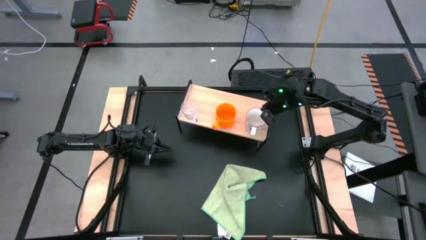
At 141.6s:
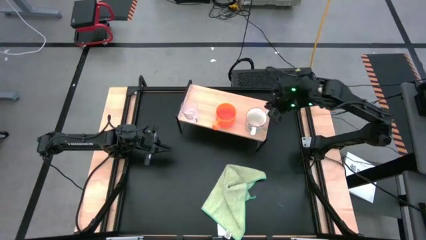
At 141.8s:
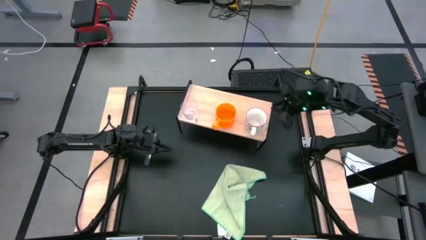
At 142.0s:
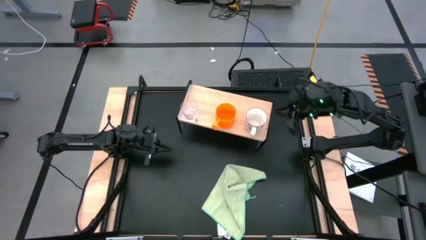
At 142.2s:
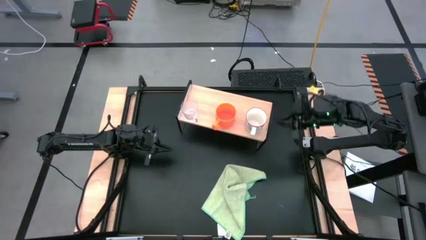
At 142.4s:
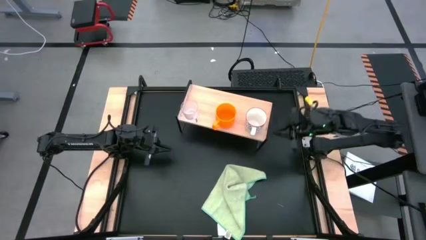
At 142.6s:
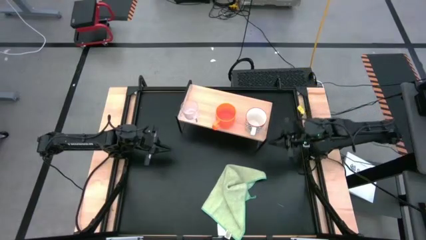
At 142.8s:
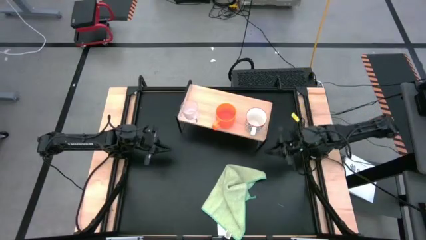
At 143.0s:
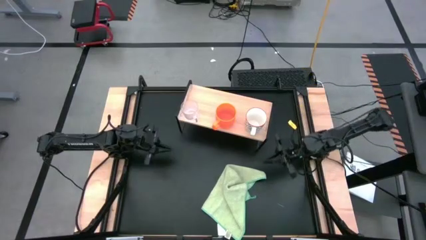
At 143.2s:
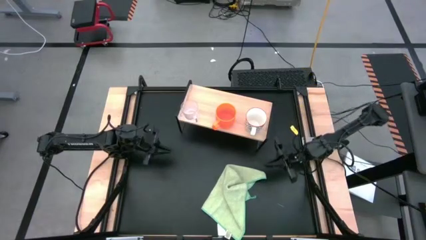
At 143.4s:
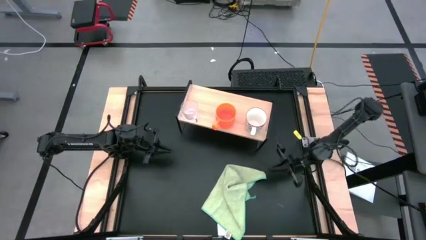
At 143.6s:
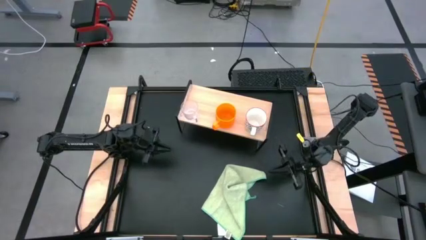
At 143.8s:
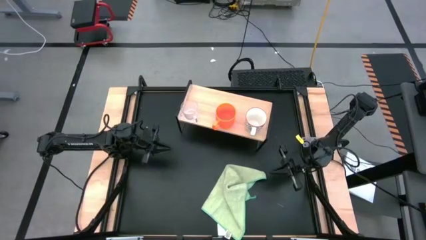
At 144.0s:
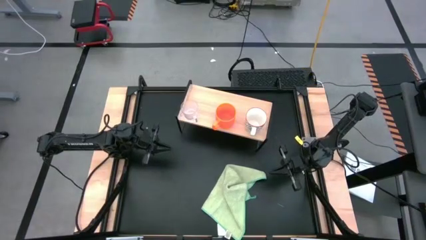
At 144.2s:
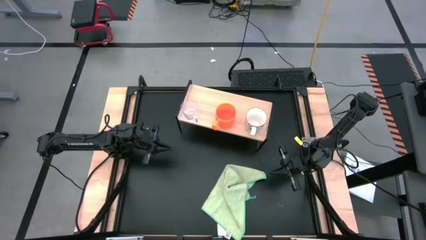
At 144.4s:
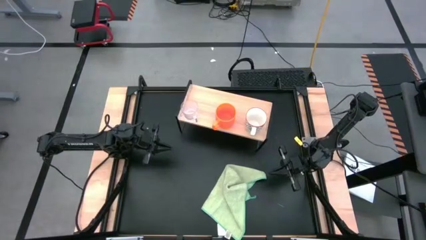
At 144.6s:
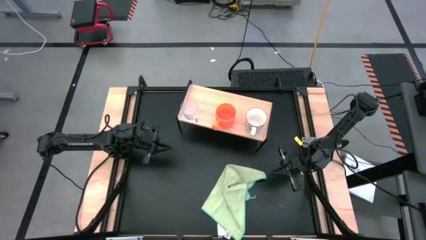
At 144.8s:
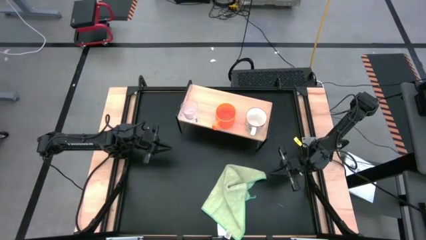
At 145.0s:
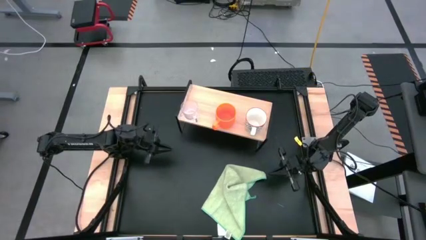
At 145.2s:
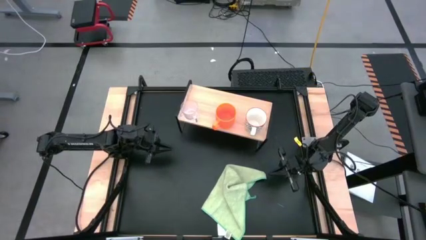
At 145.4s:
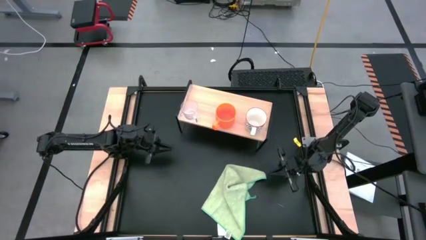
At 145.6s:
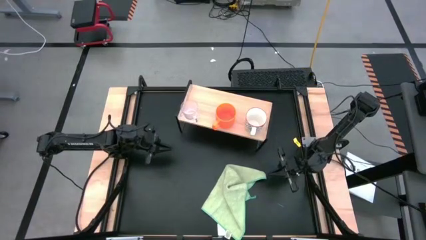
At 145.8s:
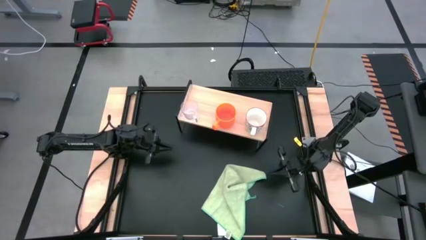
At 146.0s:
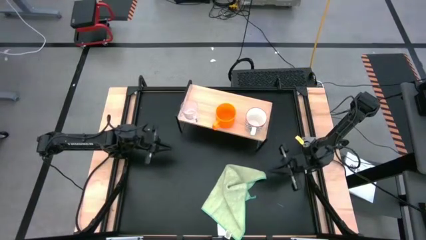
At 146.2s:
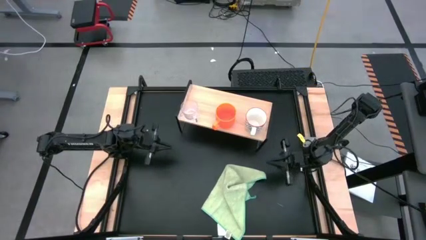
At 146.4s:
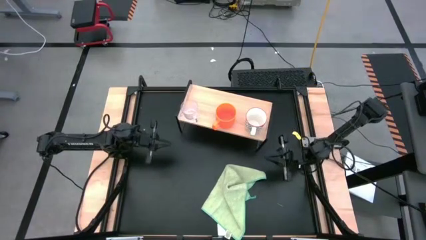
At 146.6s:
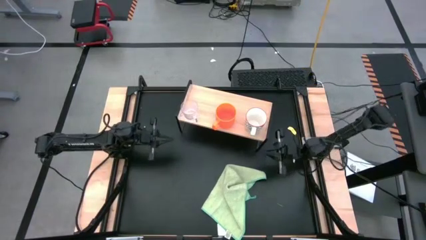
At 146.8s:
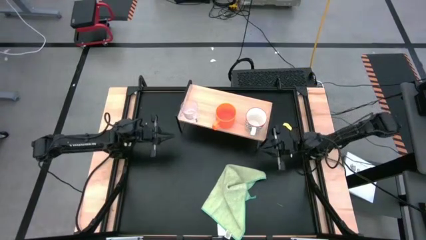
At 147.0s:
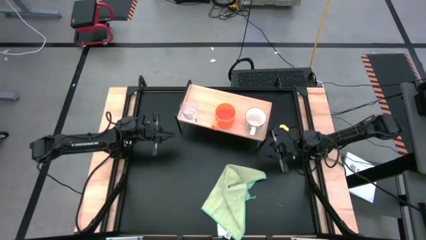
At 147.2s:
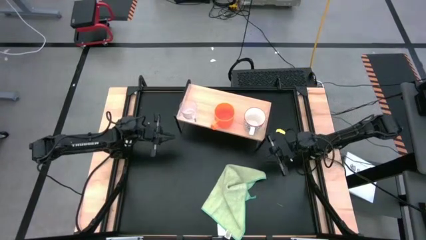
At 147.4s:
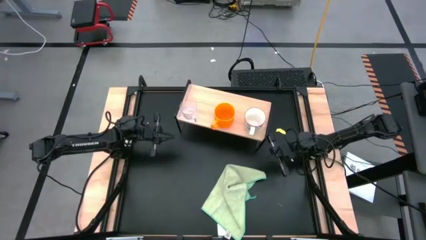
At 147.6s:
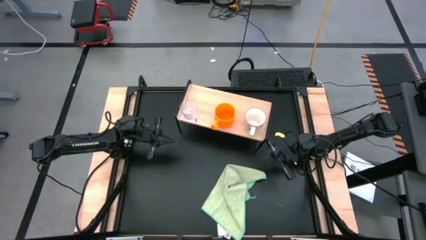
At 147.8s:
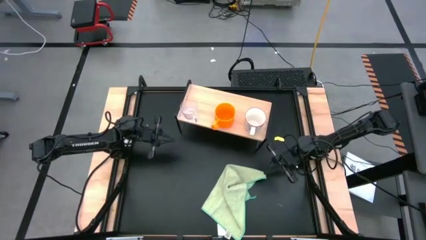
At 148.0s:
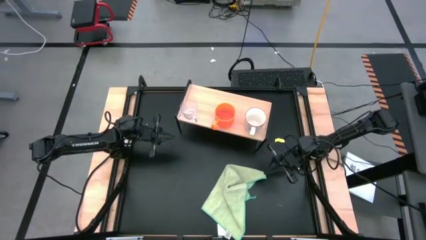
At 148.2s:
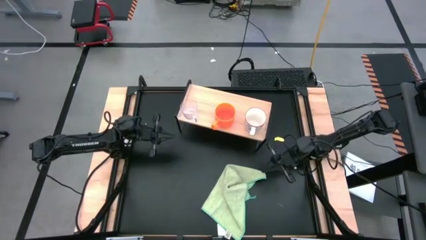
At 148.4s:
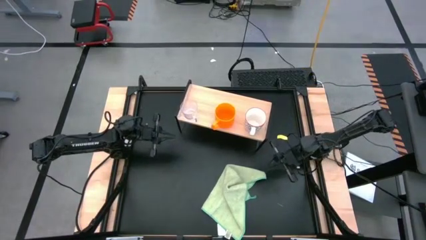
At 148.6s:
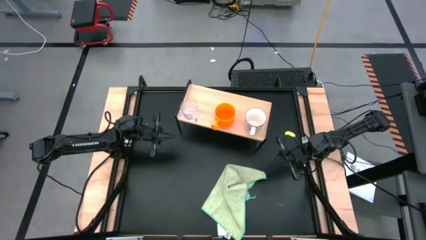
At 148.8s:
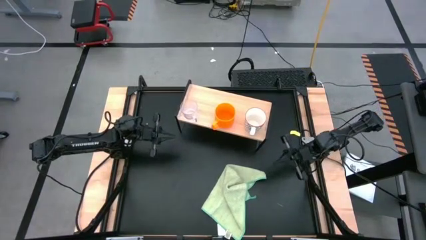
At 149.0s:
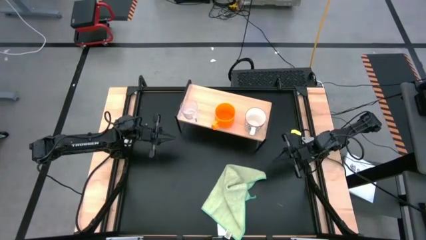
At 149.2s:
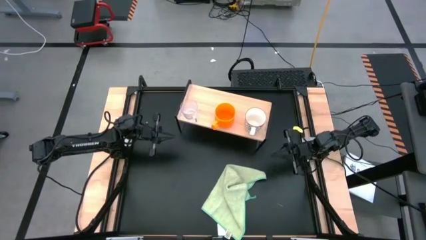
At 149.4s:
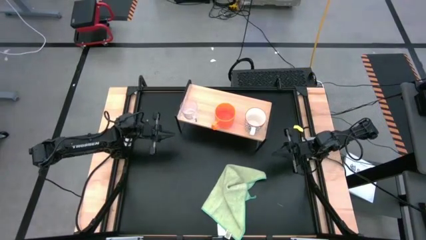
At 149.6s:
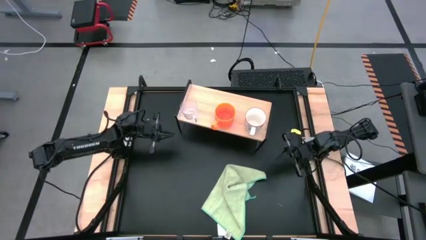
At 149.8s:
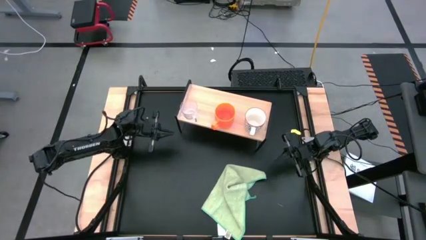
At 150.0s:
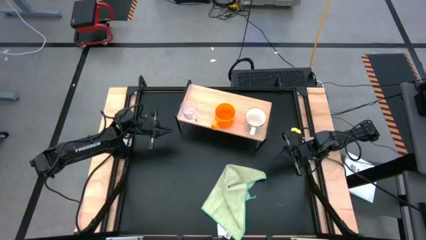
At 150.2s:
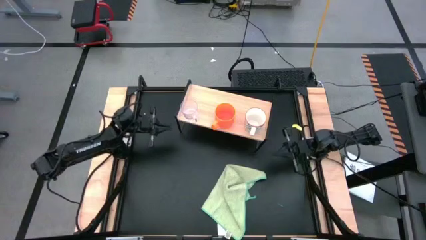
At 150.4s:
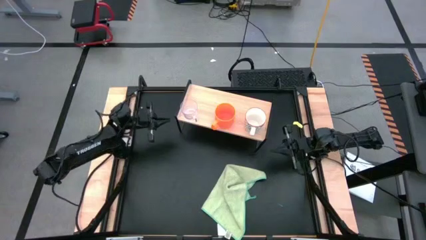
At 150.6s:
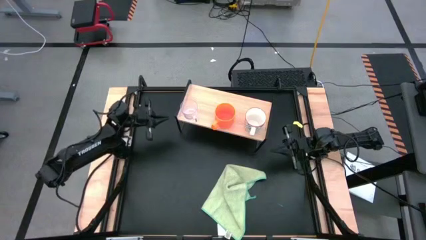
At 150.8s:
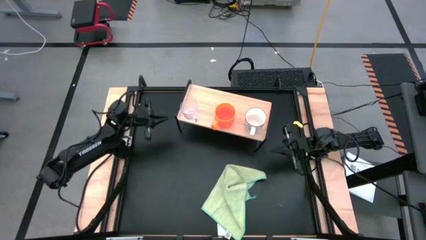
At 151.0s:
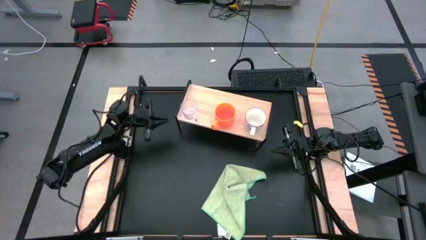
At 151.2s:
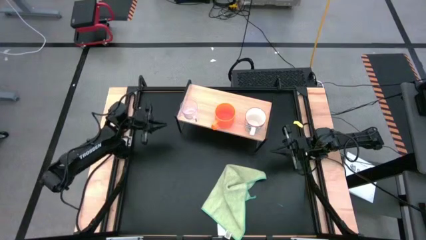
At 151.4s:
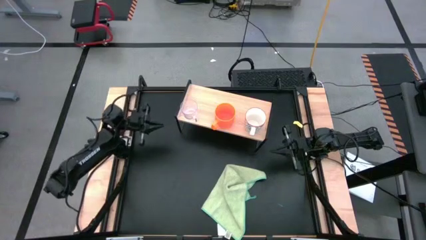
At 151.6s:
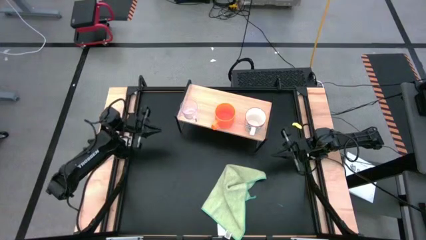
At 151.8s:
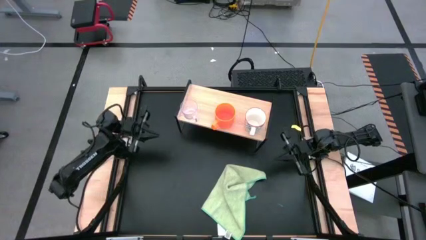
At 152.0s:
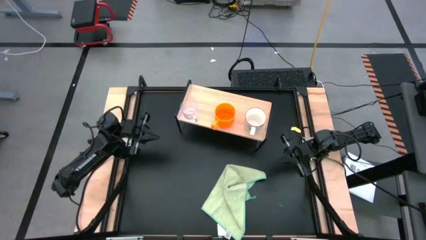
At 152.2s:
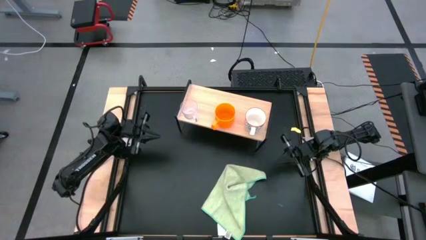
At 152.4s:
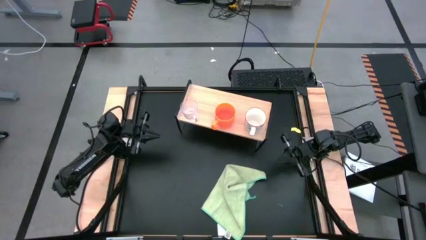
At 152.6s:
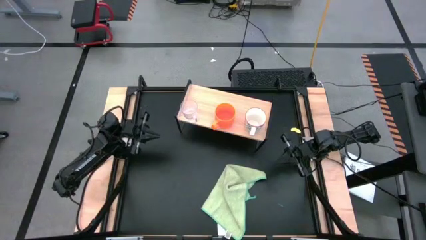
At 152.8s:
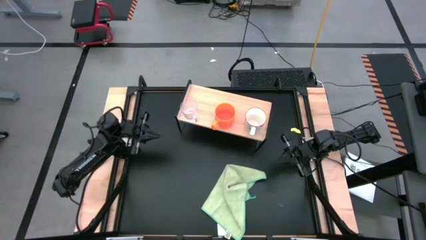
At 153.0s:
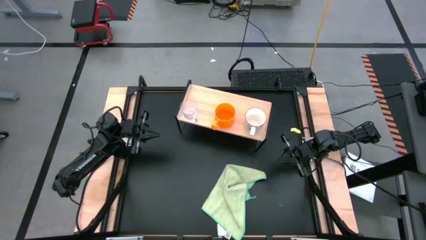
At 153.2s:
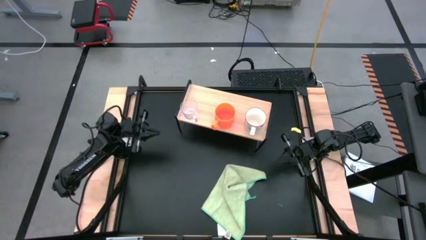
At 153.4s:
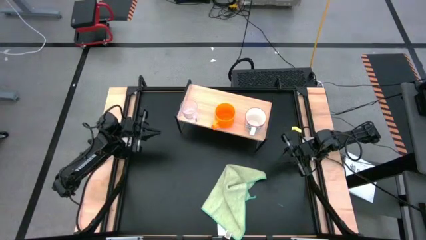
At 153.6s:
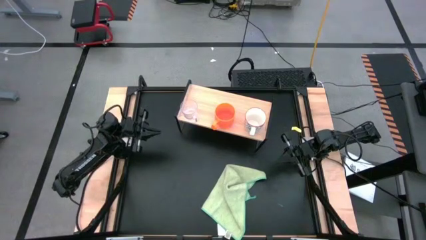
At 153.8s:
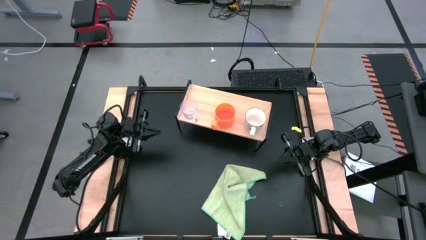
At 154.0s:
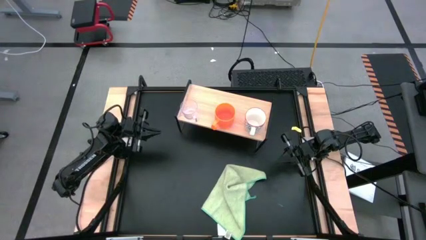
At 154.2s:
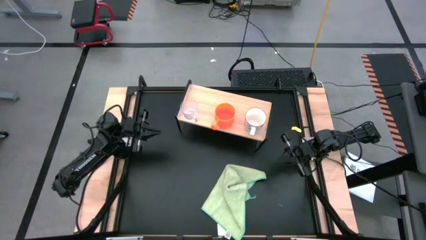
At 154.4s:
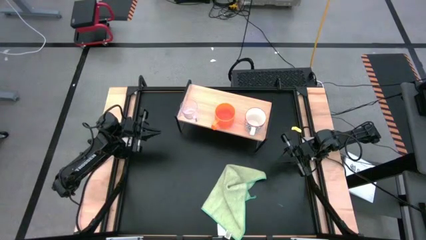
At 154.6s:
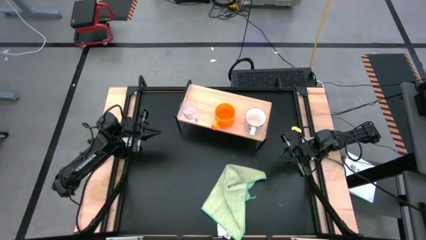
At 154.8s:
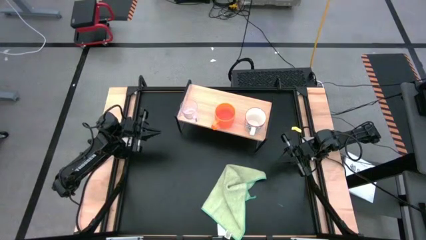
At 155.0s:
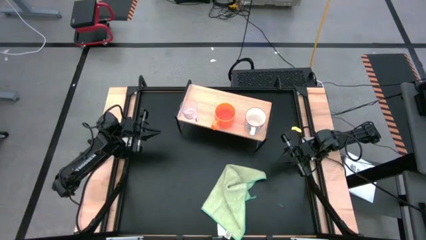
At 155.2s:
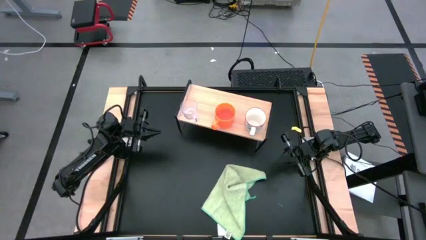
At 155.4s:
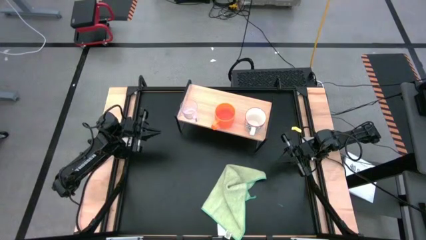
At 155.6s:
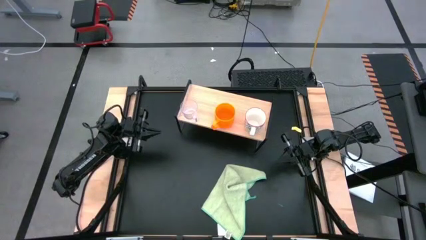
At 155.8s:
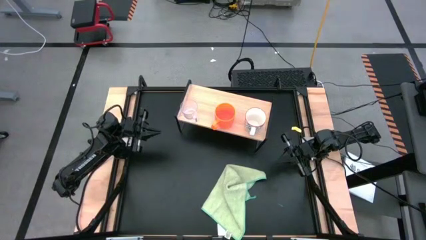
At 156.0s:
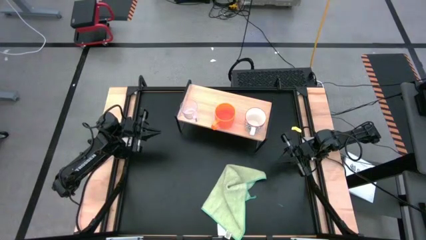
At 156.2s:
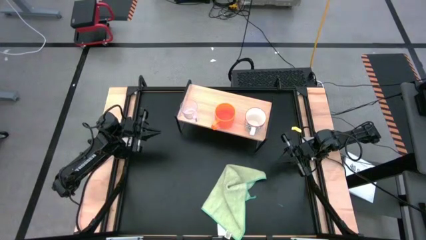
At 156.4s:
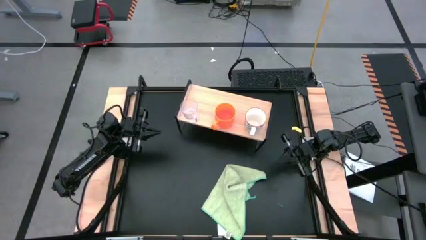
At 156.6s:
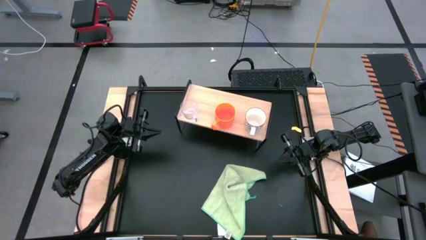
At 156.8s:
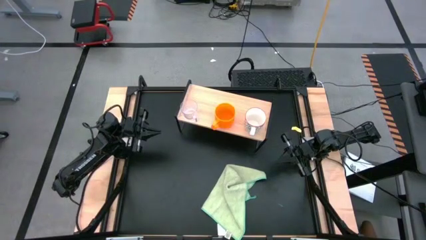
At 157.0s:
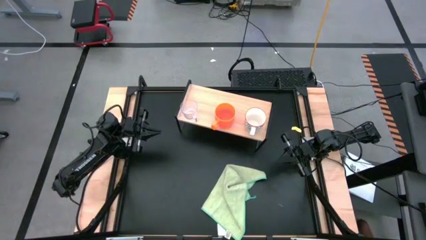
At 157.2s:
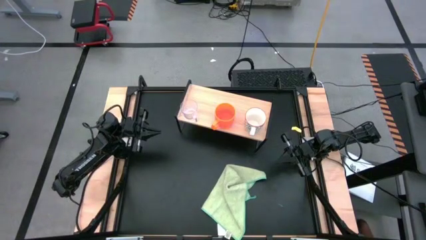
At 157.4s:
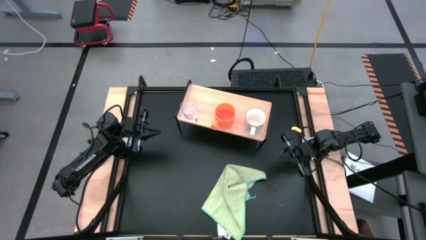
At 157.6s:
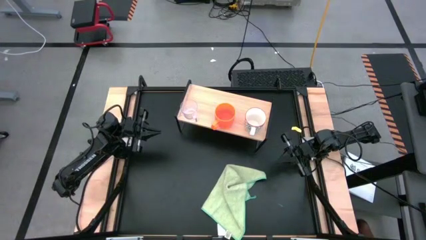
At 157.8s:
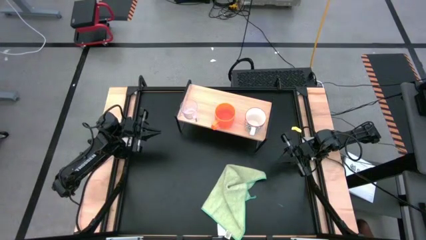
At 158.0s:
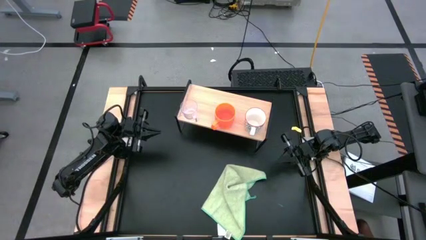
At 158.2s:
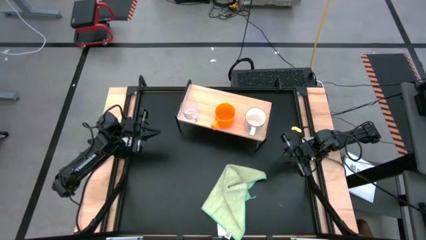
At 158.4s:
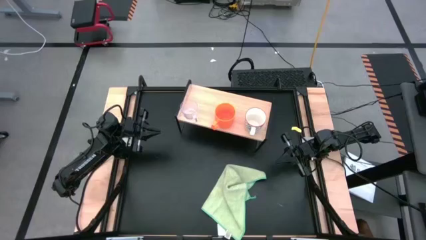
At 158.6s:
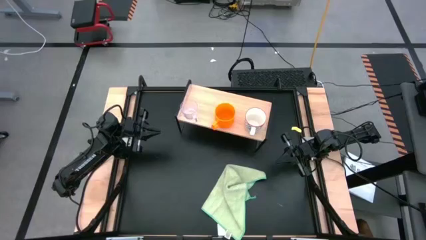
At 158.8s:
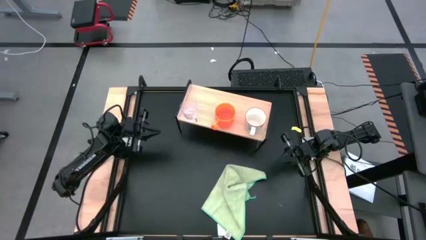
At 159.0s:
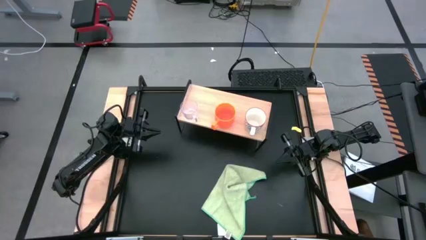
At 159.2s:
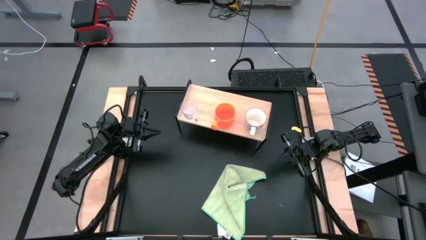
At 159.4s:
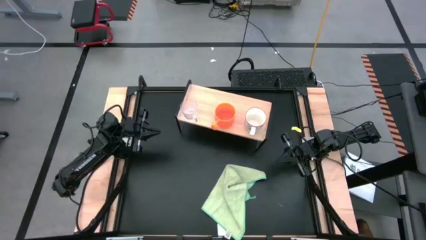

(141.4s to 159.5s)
Task: Stack small to large cups/mugs on shelf
Return to Home Position
